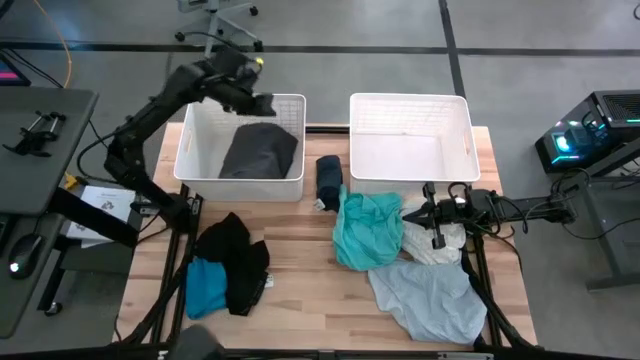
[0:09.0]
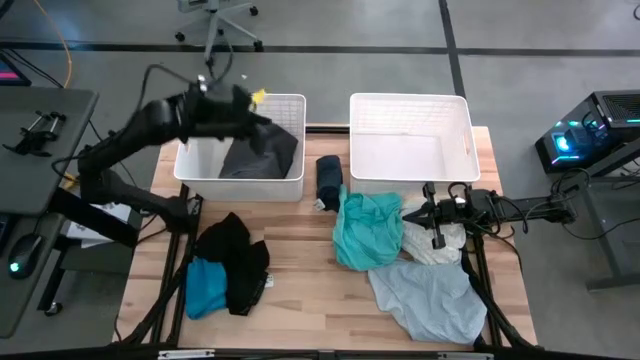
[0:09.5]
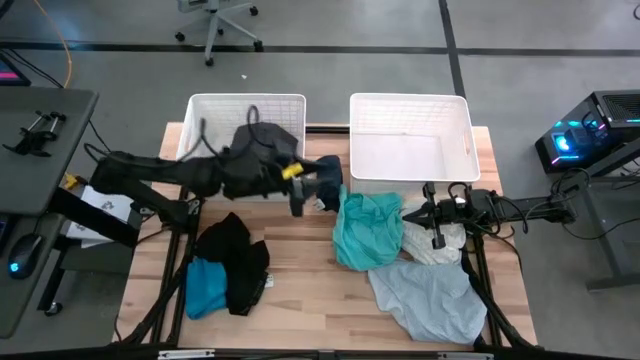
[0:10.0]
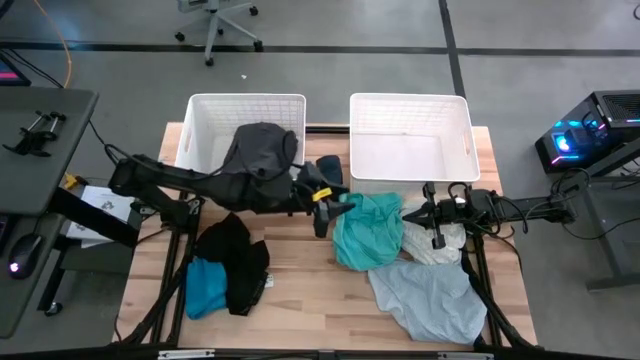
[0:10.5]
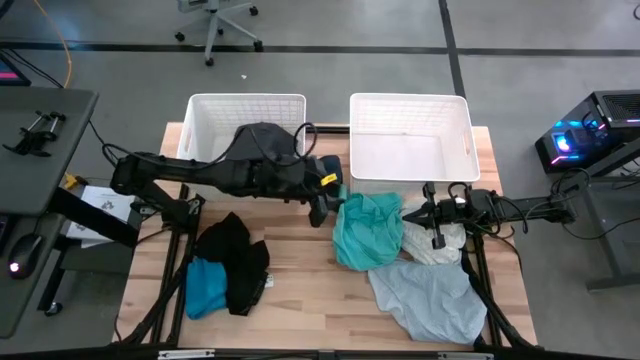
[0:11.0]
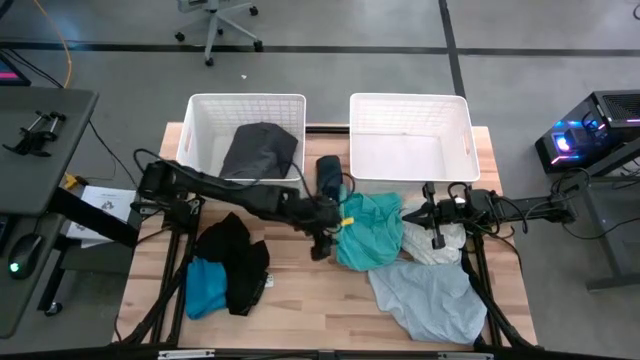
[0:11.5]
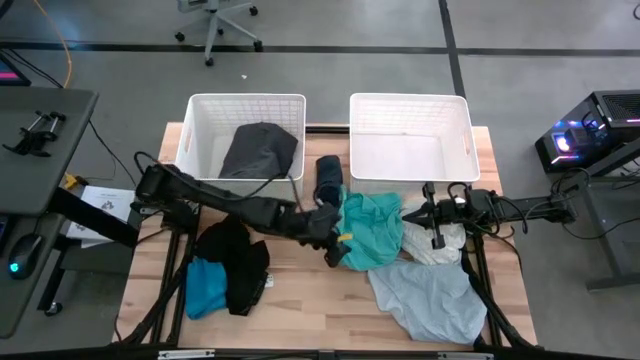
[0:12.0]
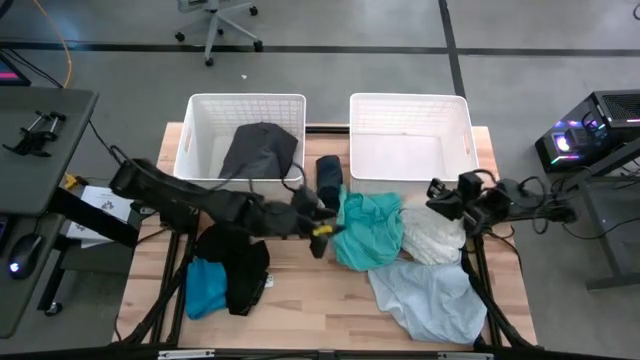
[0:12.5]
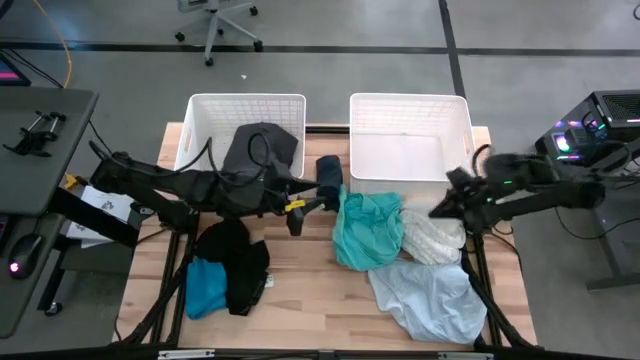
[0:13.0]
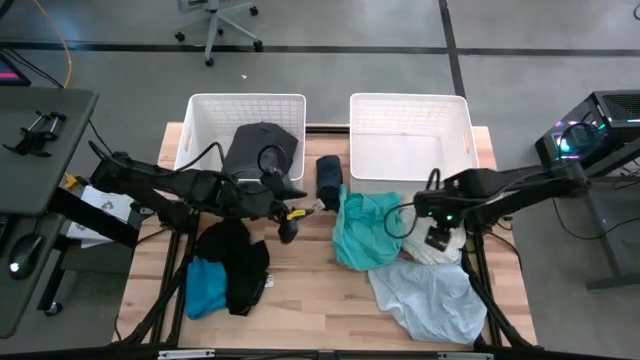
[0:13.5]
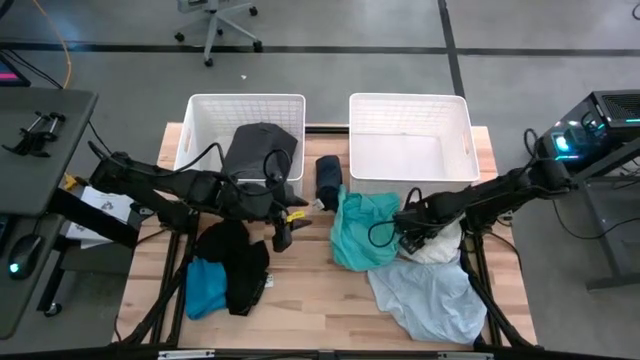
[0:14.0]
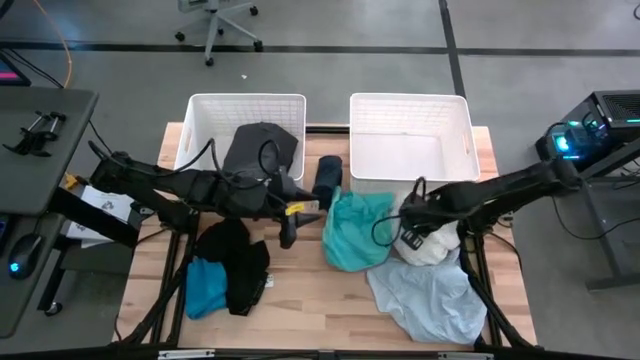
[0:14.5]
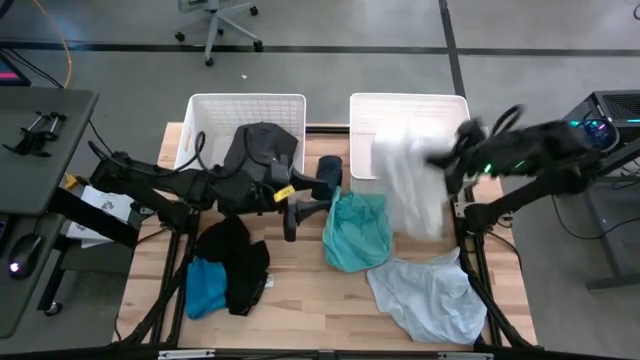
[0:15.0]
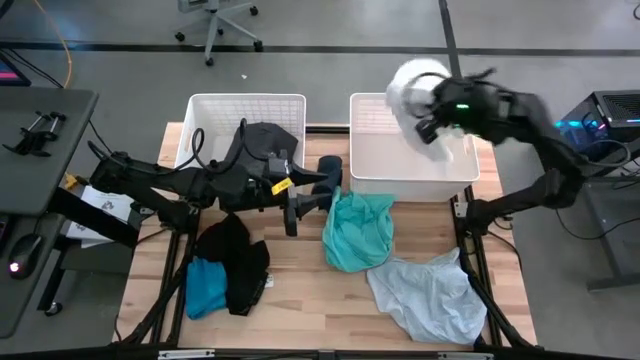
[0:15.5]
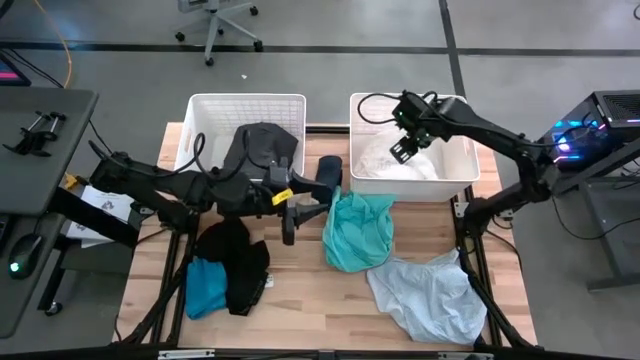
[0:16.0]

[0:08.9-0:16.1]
Task: Sort clothes
Put the white dress into the right white laundry bin

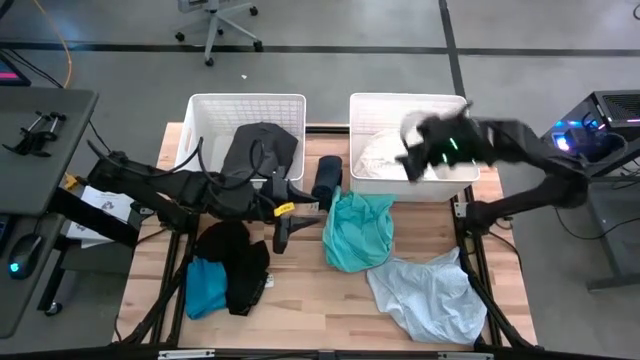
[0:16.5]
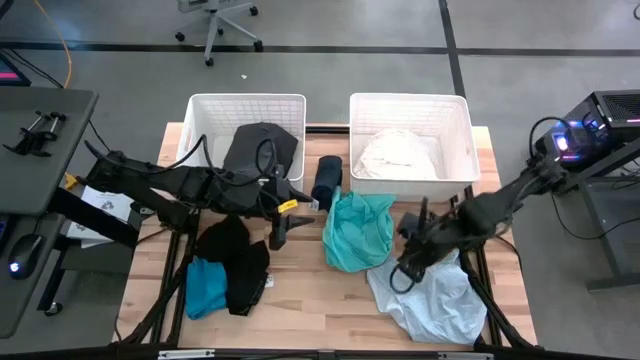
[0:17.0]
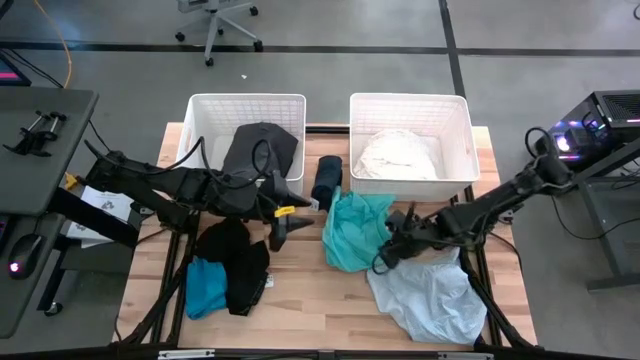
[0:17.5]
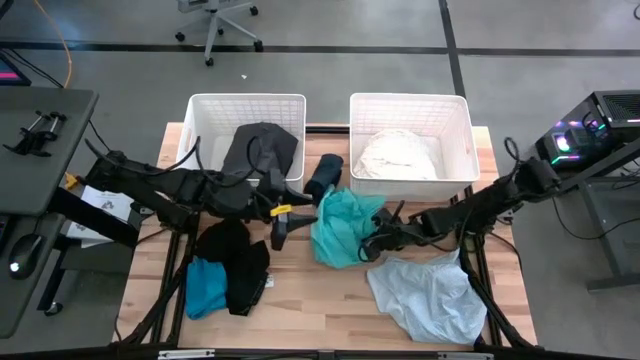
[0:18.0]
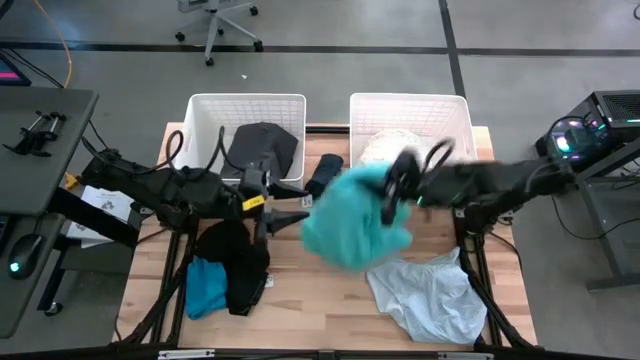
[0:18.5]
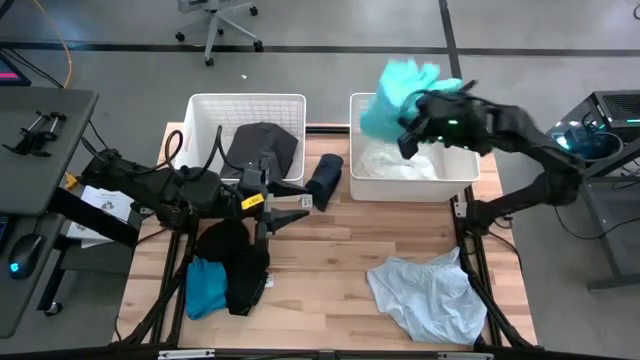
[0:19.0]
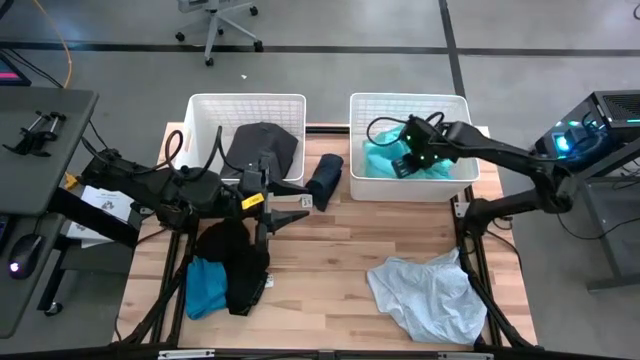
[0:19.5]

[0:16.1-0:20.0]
Put the light blue shirt into the right white laundry bin

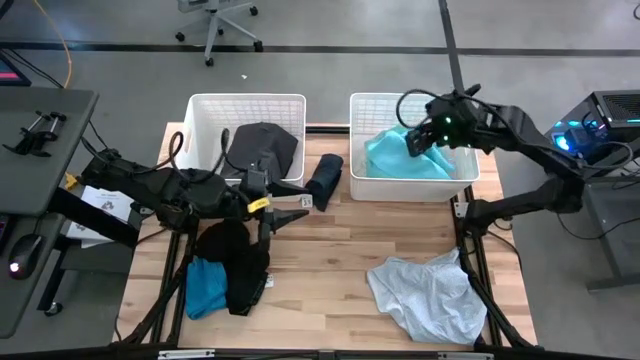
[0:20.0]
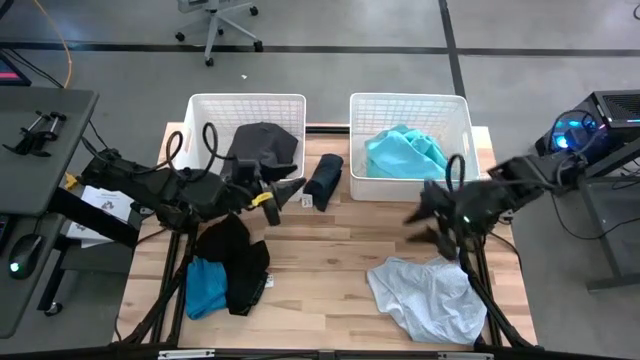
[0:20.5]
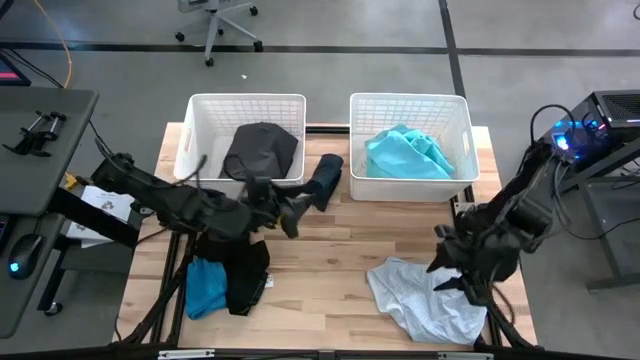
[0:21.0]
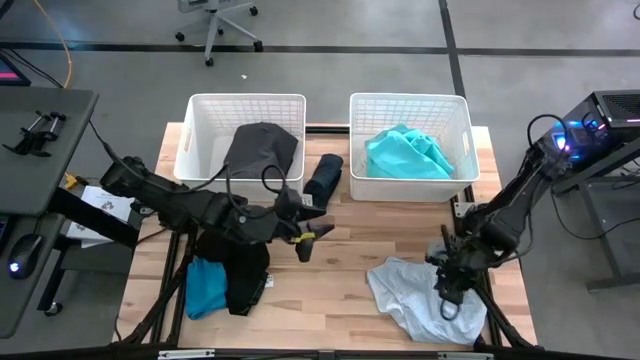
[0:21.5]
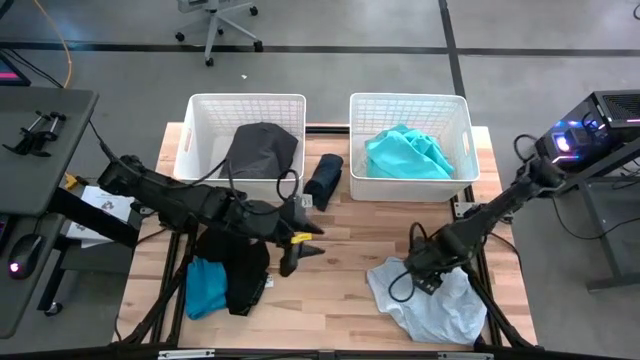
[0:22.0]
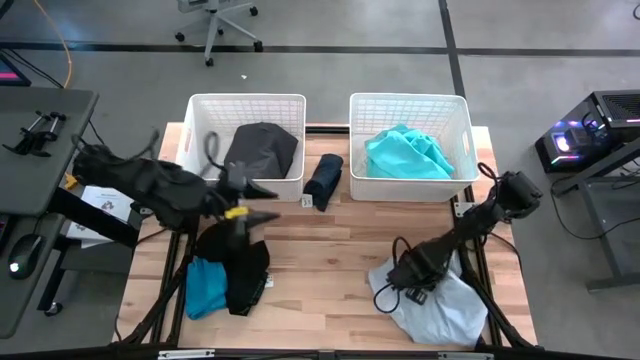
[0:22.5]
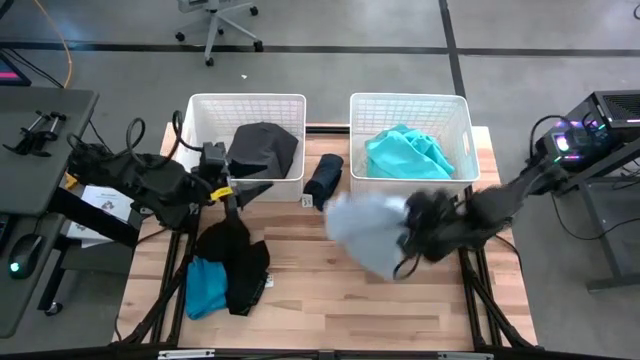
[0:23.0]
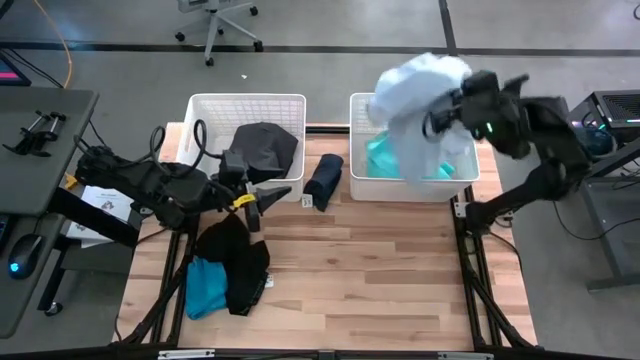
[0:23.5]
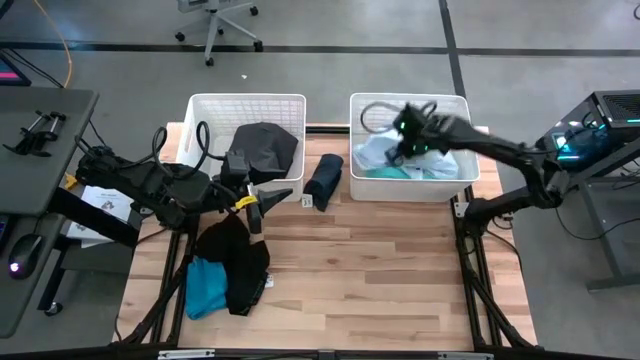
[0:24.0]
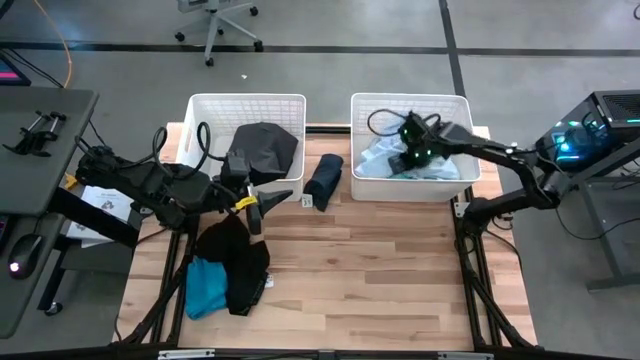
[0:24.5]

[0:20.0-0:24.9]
Put the white patient gown into the right white laundry bin

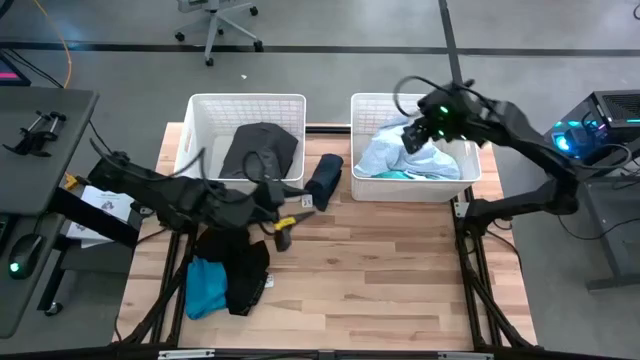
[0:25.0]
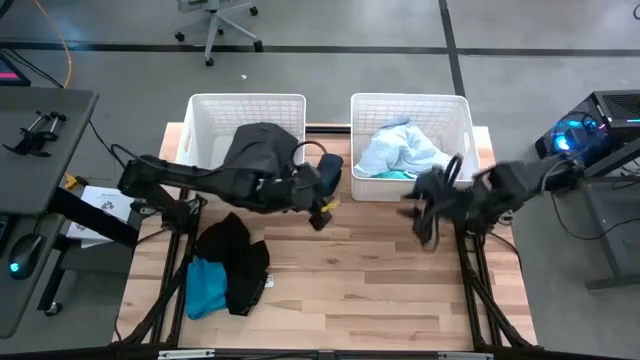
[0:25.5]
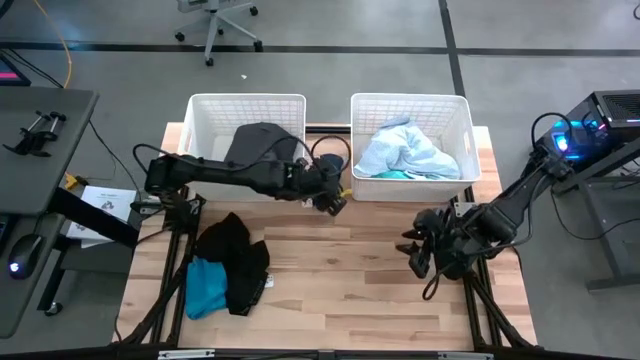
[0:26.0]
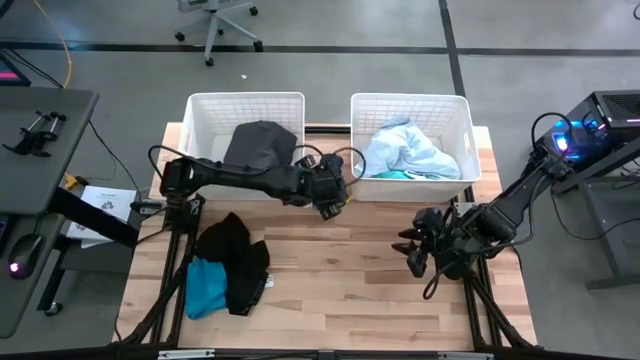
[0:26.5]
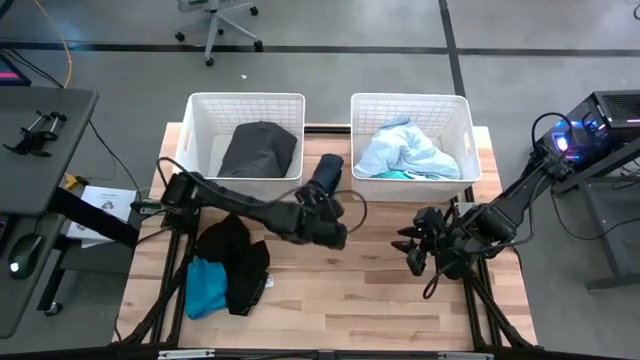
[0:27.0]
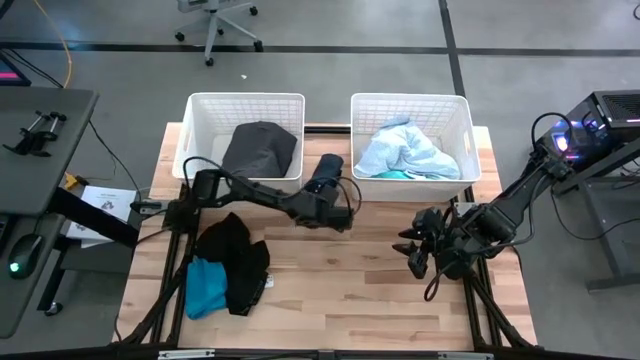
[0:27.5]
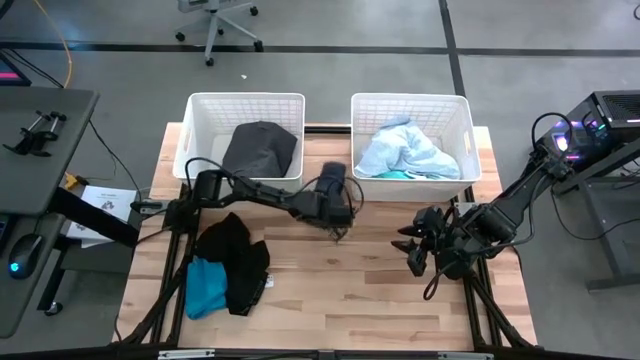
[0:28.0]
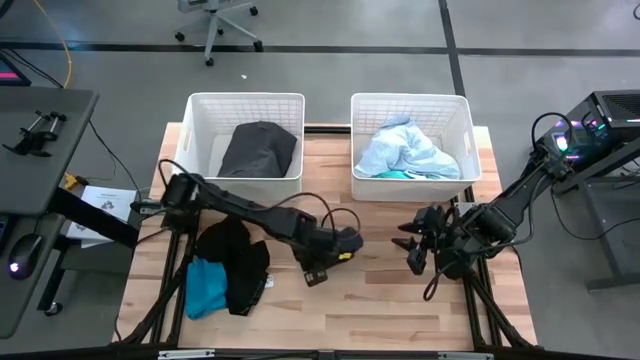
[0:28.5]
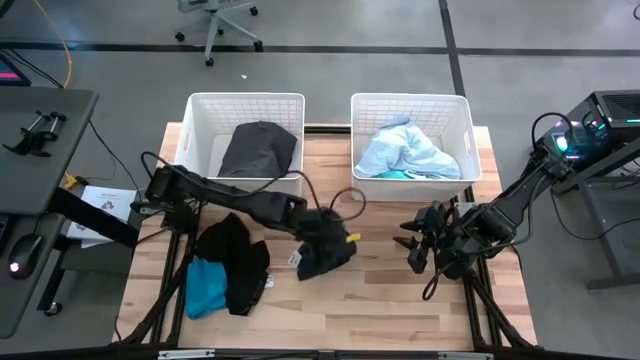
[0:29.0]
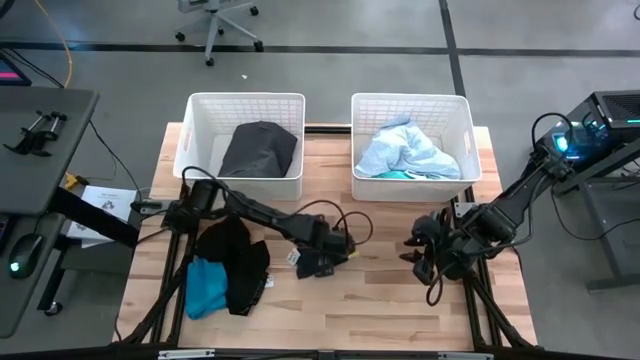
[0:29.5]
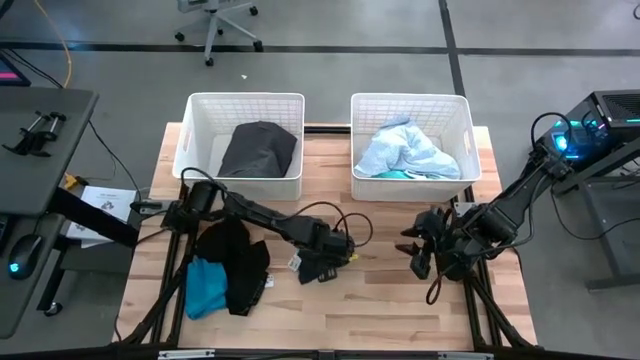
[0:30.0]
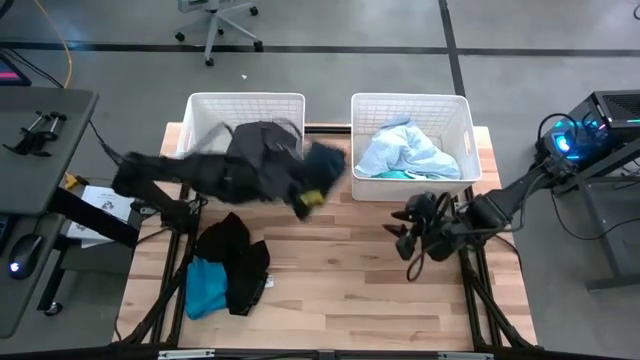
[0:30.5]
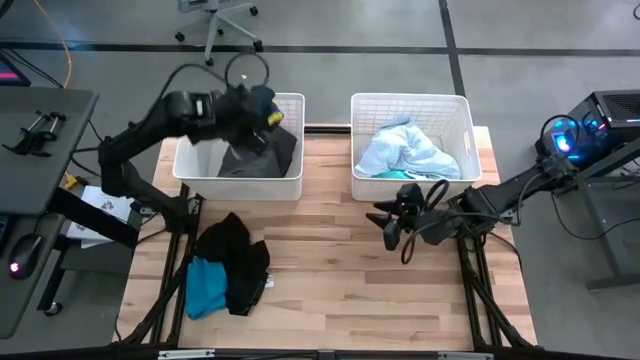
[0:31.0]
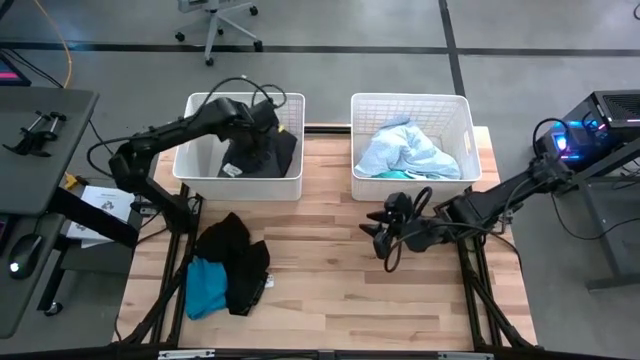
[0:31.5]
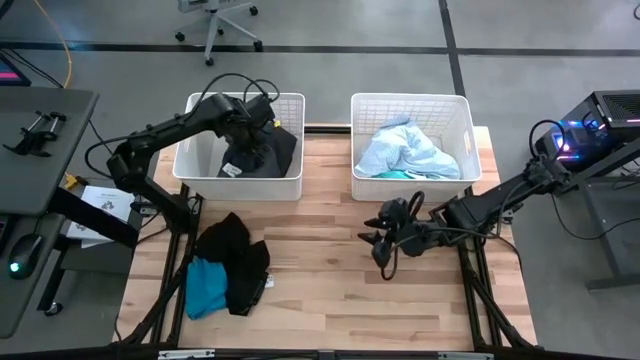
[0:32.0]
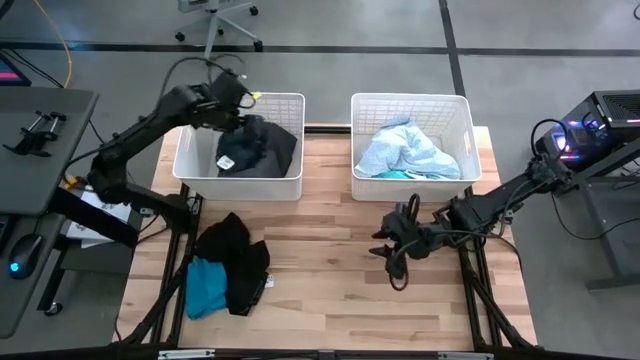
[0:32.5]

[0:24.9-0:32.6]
Put the dark blue short into the left white laundry bin
